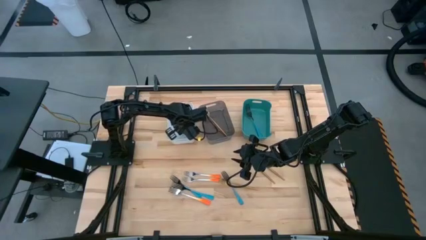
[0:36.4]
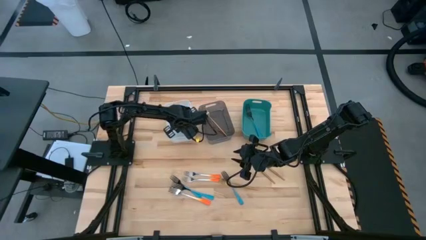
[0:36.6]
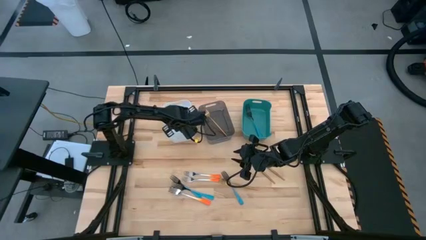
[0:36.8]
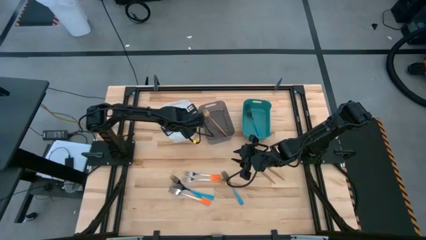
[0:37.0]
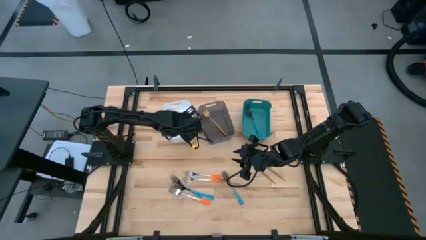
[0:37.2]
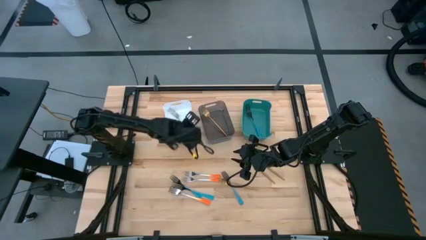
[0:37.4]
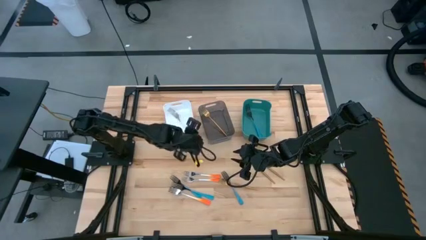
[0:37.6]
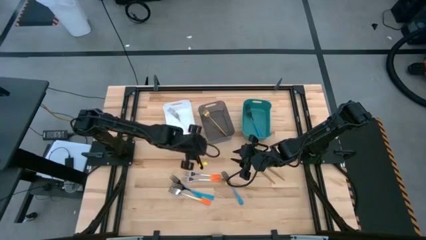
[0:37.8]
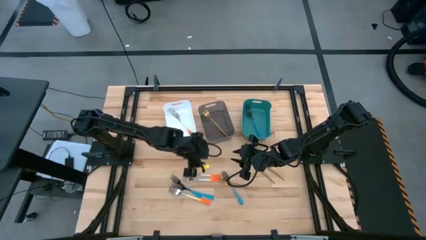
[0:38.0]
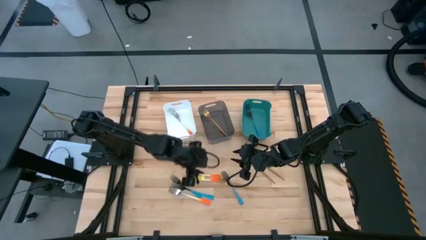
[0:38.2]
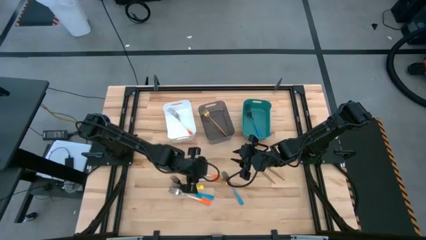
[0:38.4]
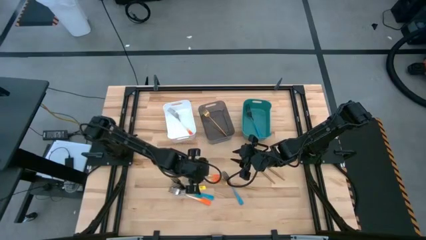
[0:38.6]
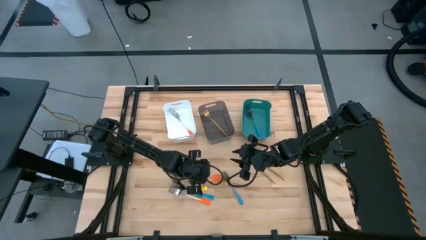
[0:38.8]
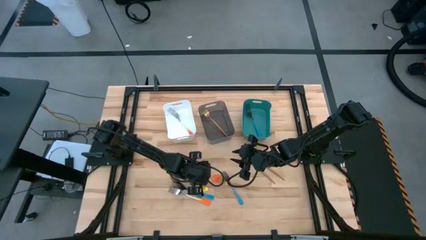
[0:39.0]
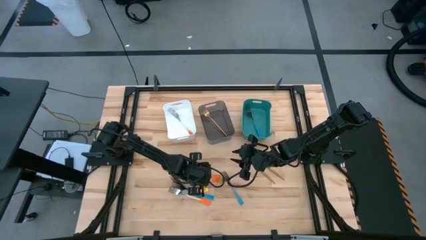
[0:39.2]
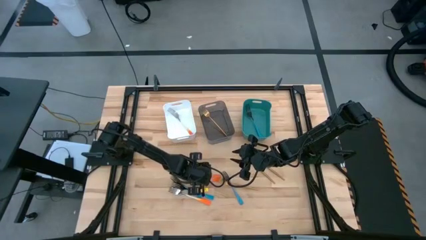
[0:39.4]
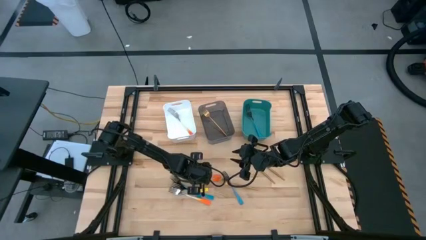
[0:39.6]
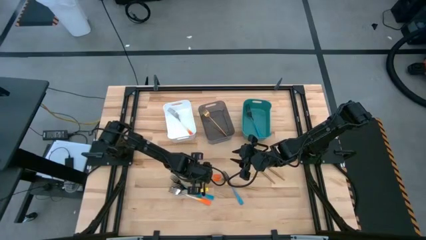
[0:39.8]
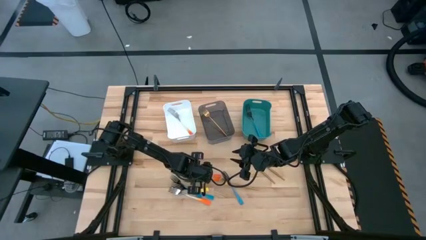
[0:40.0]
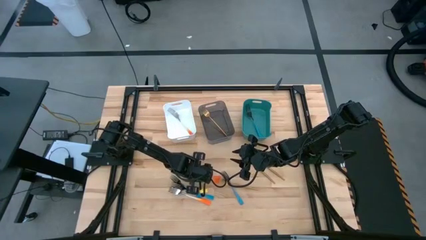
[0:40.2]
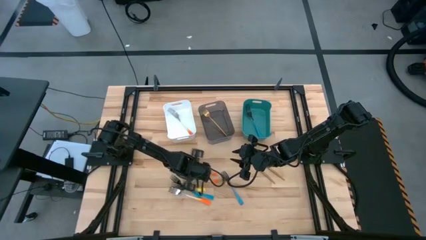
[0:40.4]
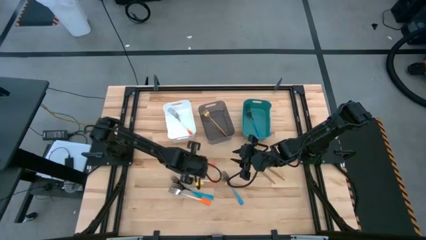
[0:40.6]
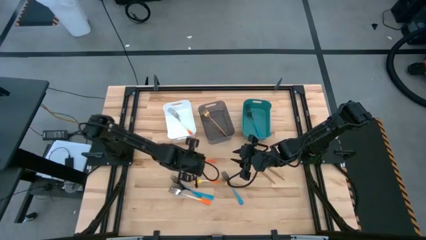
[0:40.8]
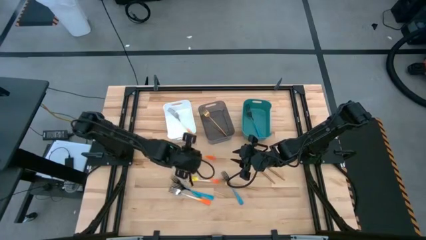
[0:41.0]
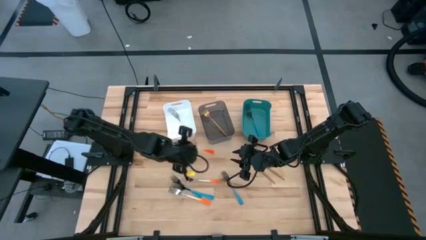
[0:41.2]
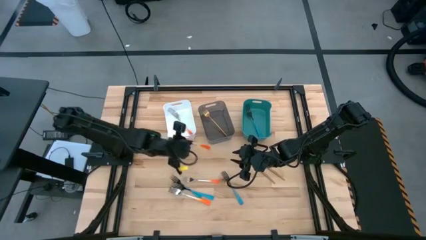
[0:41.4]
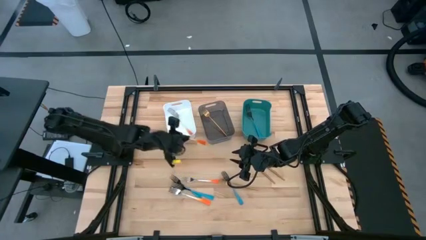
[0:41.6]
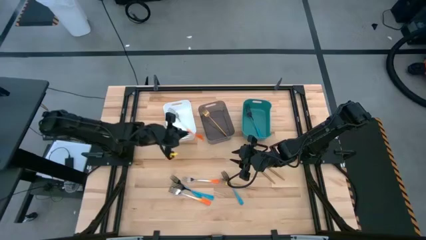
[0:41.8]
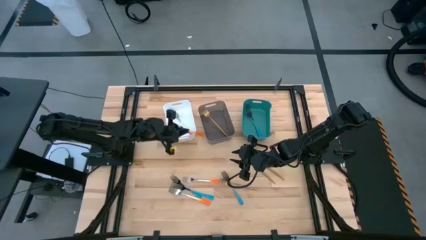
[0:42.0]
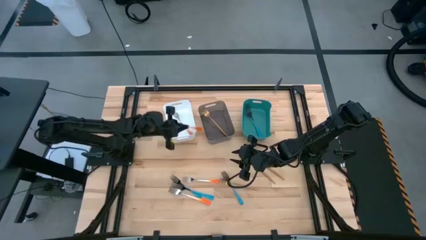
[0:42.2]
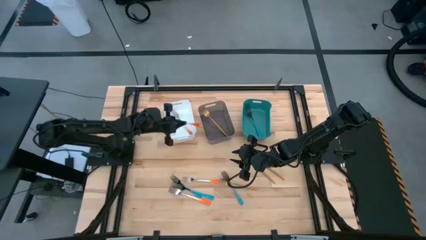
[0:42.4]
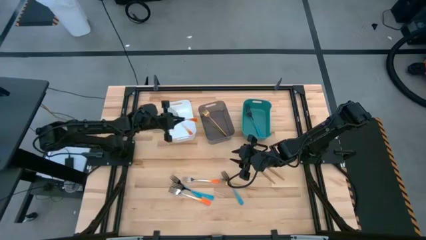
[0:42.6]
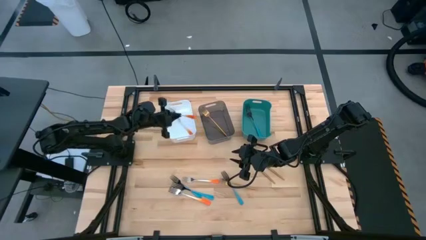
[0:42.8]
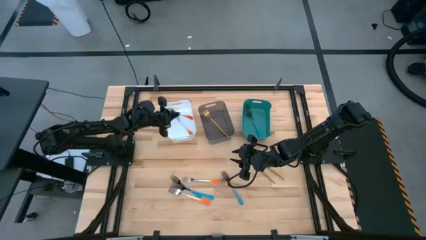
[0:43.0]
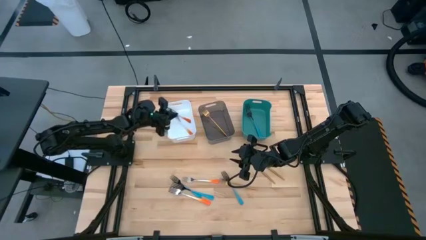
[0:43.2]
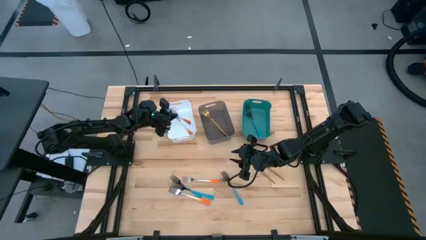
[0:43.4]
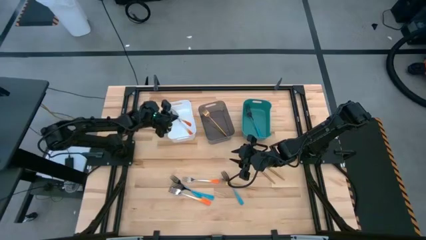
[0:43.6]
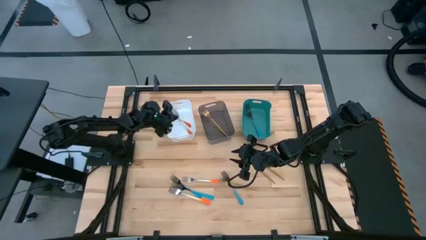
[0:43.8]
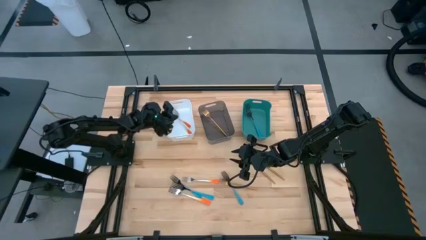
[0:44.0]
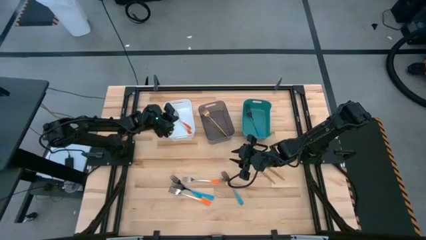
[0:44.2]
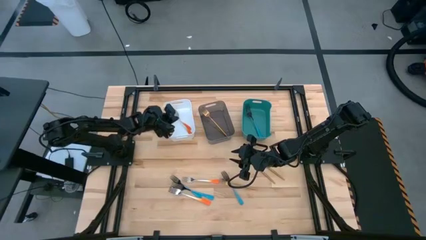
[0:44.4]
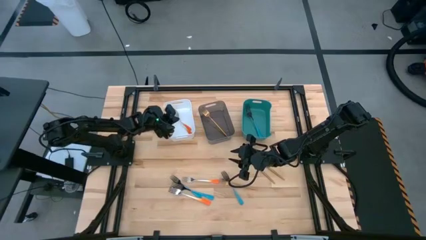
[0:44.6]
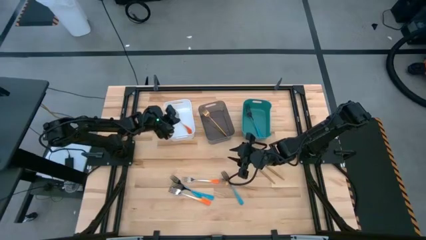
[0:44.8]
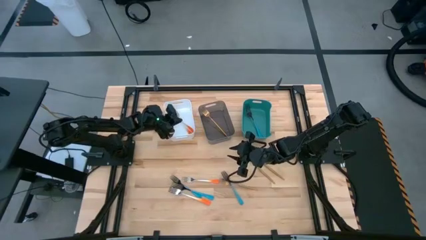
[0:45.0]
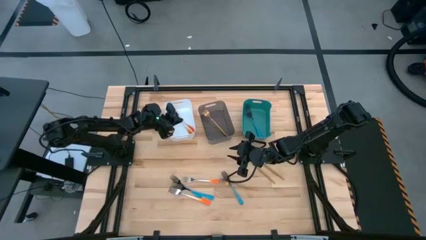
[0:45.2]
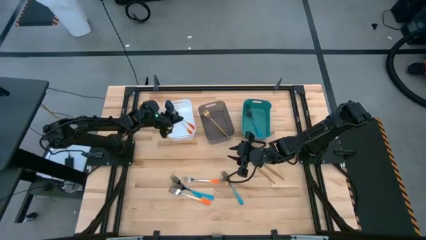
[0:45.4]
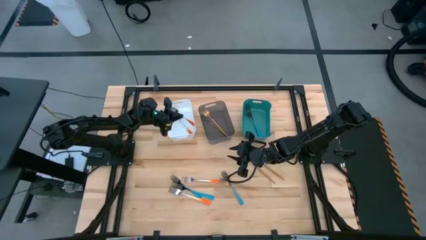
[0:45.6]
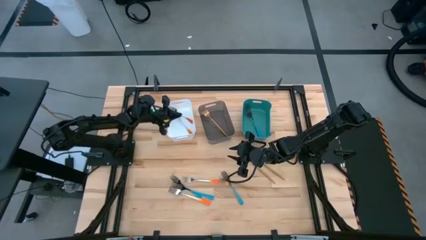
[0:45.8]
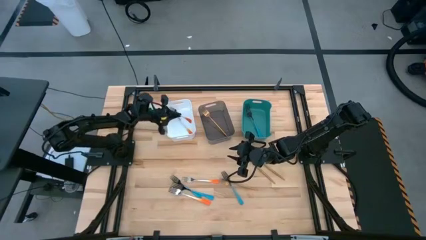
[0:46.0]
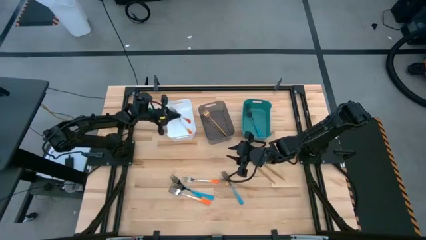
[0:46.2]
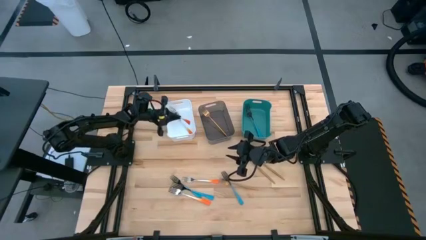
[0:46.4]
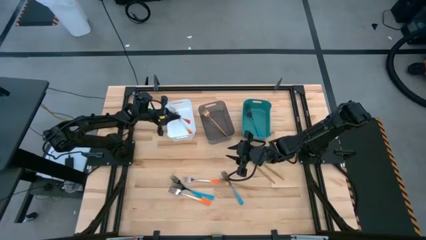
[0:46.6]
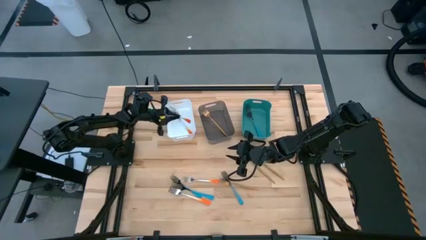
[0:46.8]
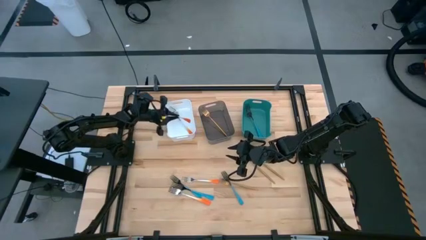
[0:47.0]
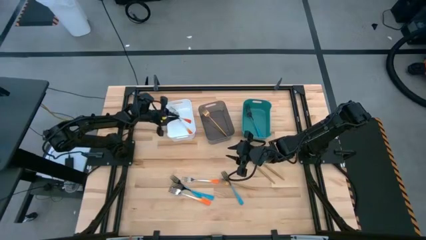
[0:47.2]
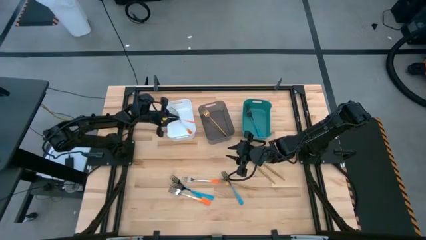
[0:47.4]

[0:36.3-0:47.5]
Task: Sort silverware by color (type)
Put the orange fork into the white bin

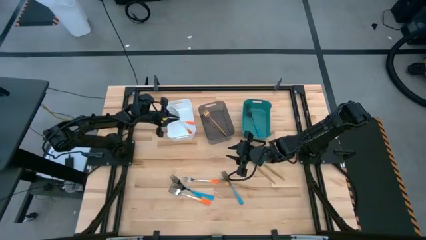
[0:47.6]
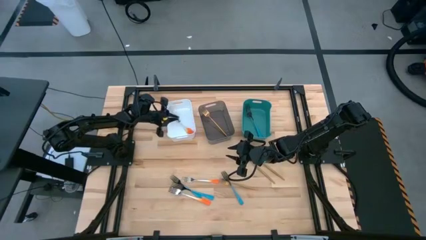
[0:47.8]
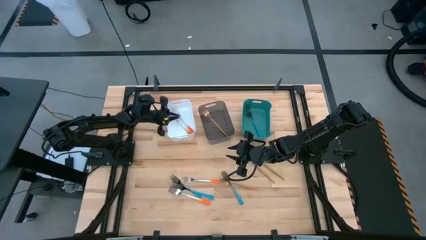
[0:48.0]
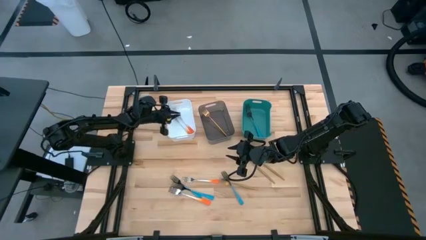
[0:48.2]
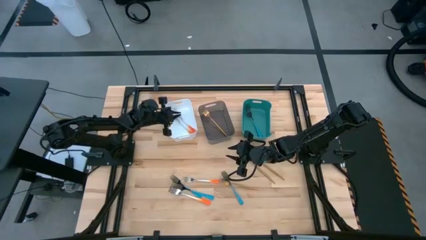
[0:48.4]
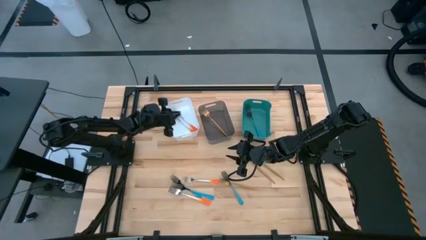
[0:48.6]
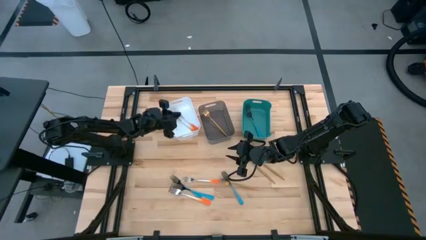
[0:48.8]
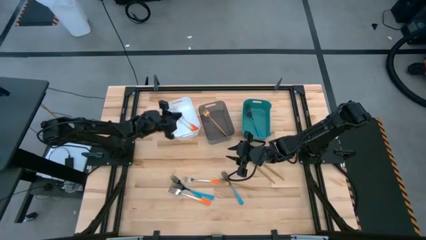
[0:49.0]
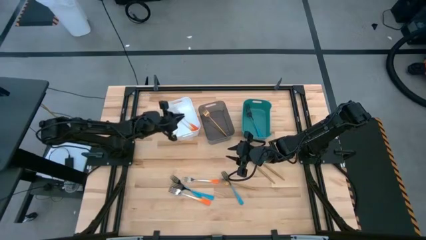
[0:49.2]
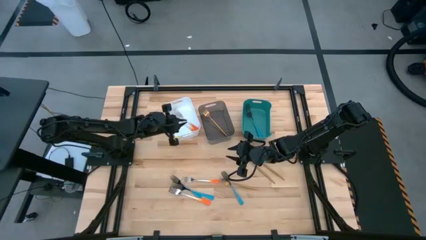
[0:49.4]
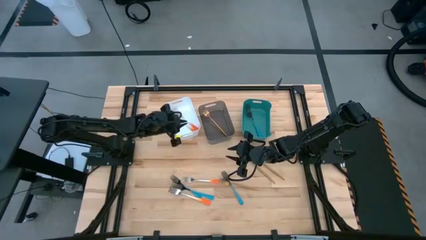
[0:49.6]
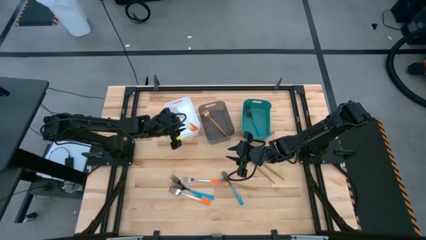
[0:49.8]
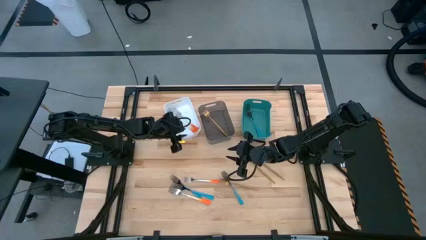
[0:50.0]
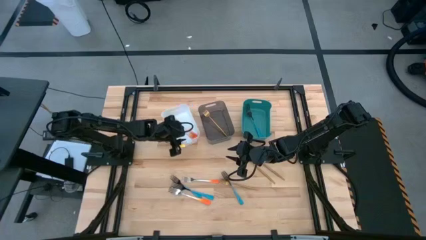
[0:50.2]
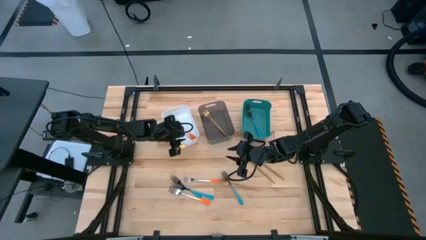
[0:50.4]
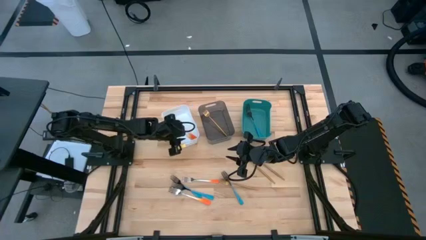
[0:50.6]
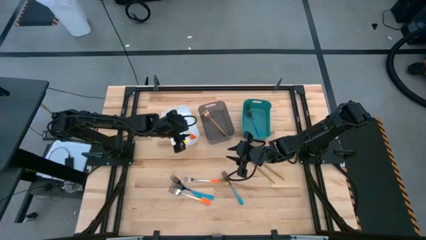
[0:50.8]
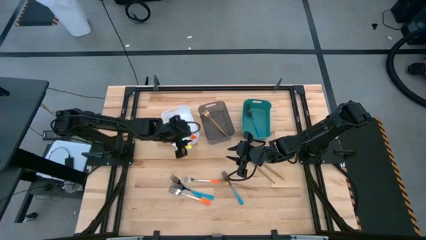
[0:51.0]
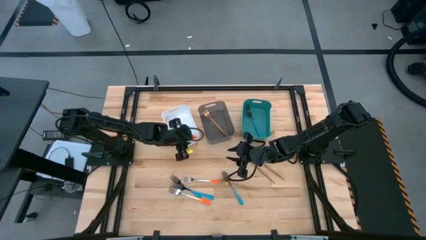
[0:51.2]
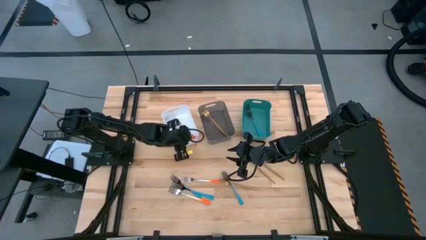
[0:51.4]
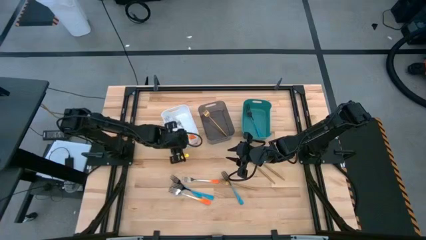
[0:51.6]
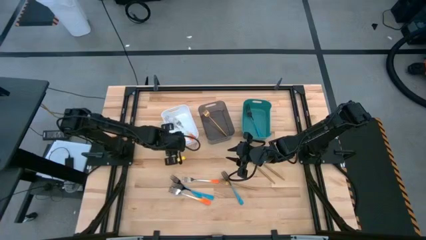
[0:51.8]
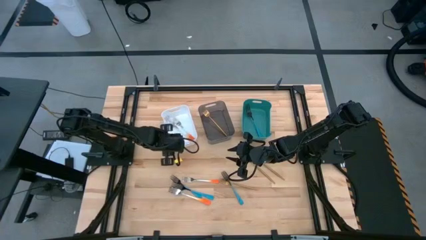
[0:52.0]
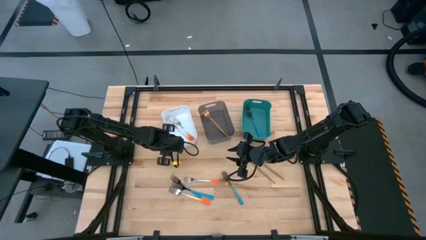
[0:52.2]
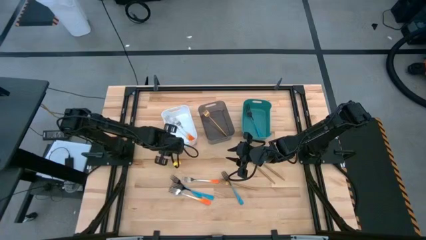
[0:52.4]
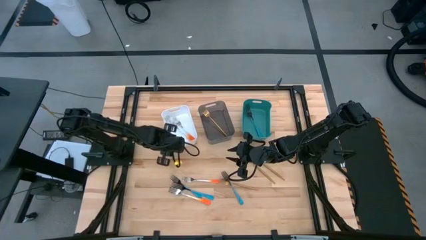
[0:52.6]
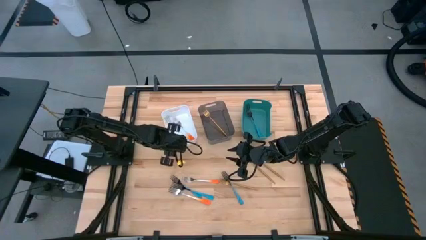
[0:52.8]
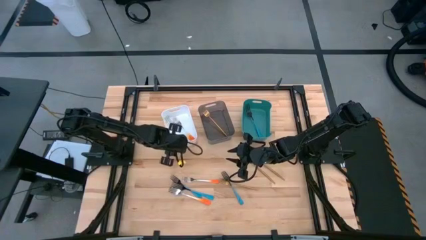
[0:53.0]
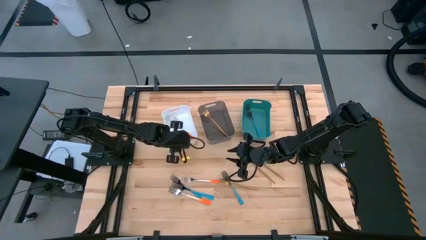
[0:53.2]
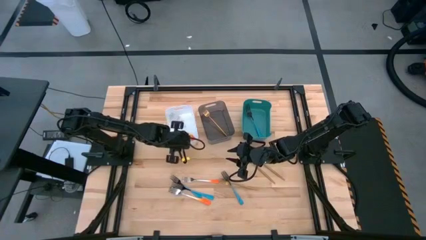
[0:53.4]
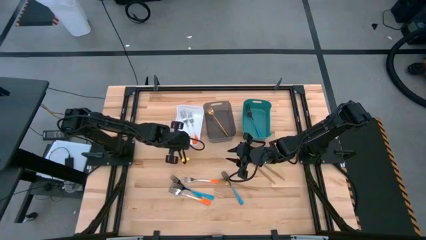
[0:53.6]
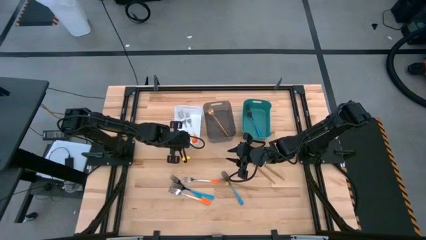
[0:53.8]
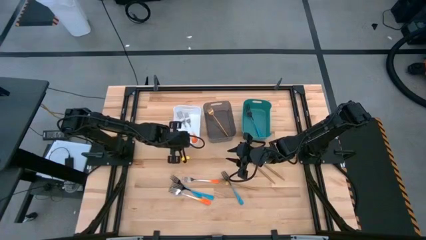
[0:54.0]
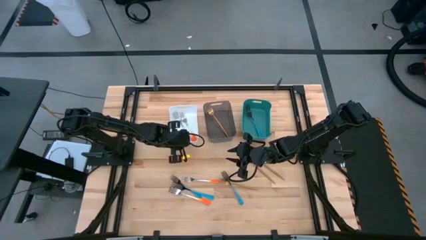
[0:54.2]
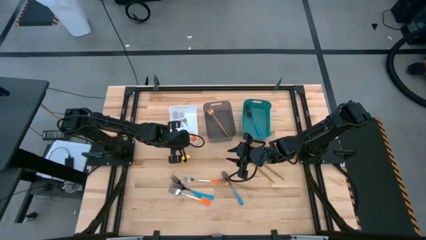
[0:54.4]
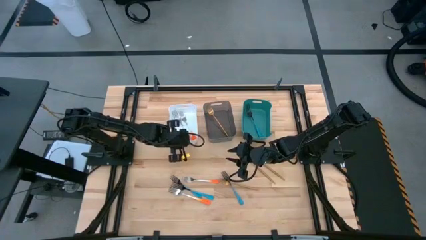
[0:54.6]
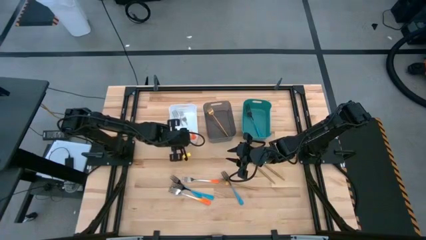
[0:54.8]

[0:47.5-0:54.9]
Adjust the white bin on the table
